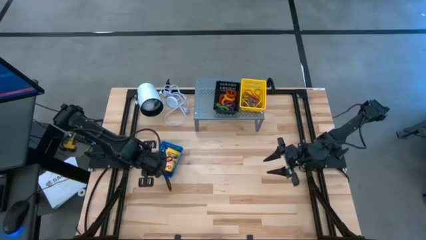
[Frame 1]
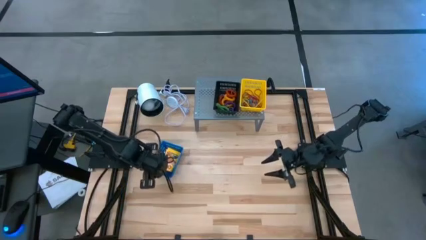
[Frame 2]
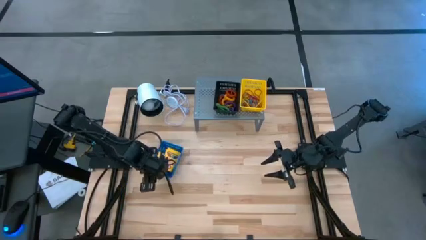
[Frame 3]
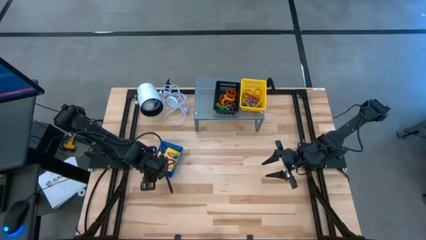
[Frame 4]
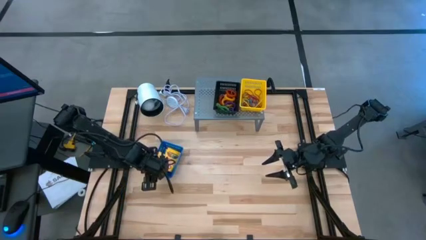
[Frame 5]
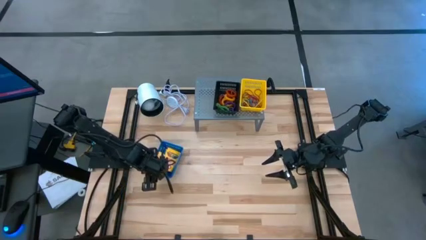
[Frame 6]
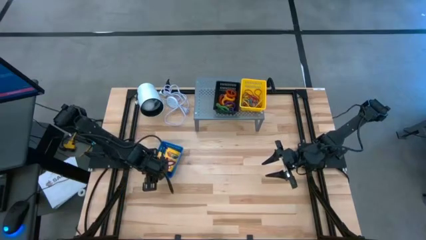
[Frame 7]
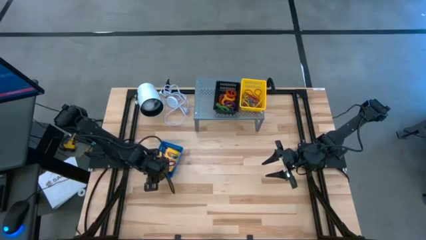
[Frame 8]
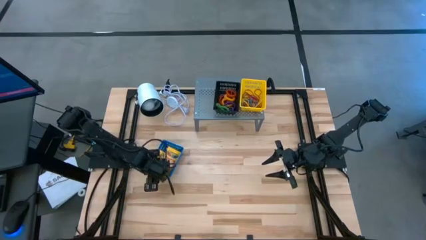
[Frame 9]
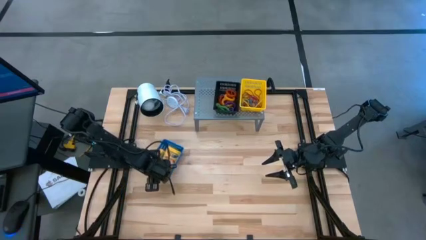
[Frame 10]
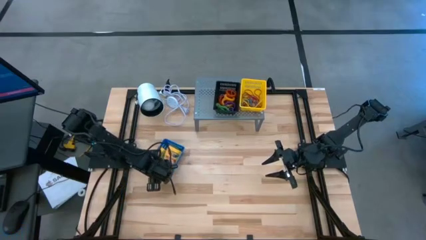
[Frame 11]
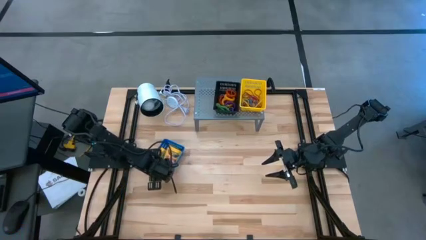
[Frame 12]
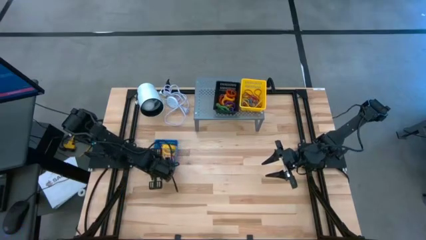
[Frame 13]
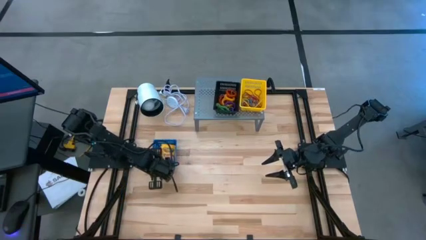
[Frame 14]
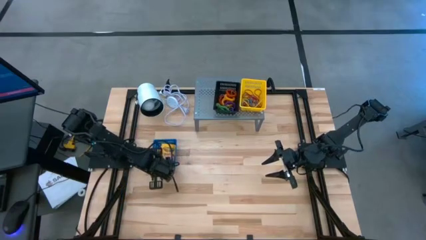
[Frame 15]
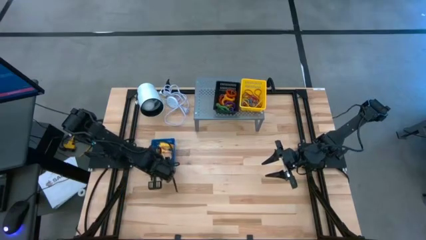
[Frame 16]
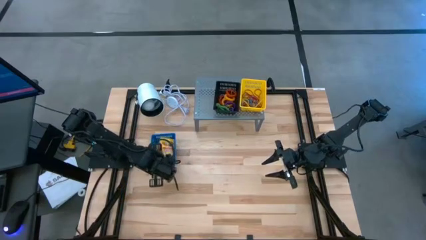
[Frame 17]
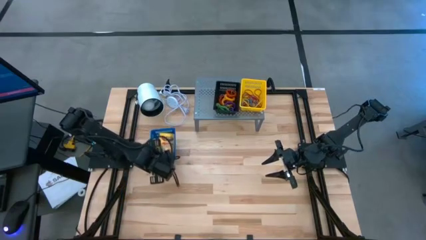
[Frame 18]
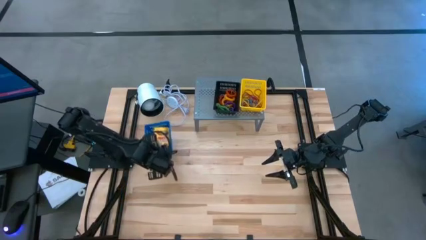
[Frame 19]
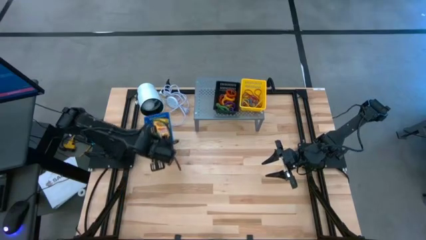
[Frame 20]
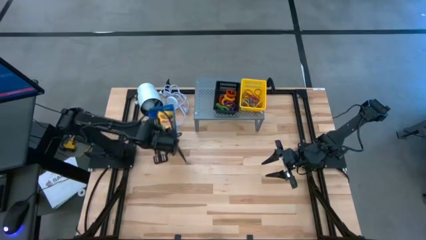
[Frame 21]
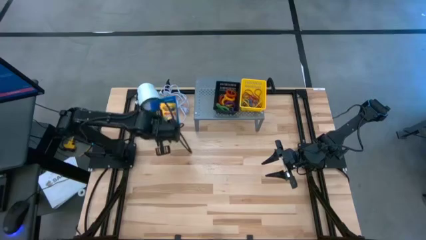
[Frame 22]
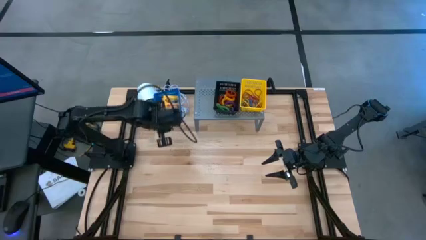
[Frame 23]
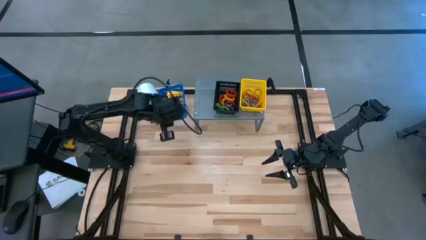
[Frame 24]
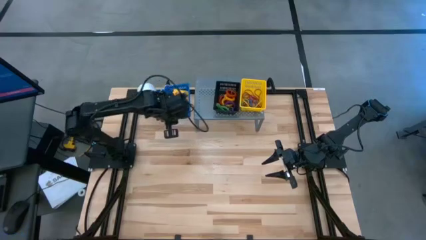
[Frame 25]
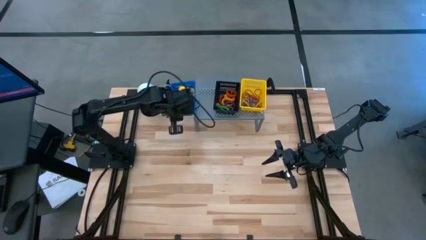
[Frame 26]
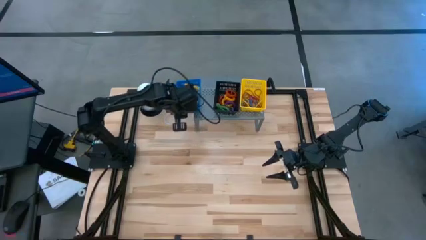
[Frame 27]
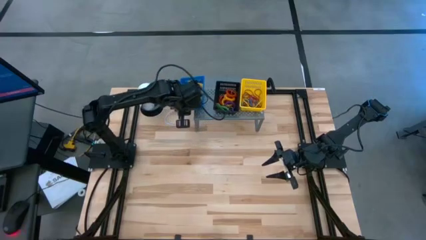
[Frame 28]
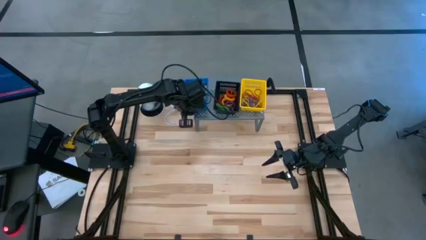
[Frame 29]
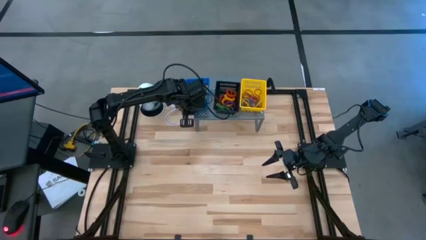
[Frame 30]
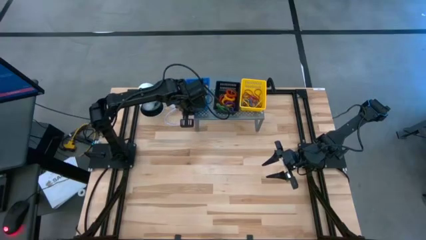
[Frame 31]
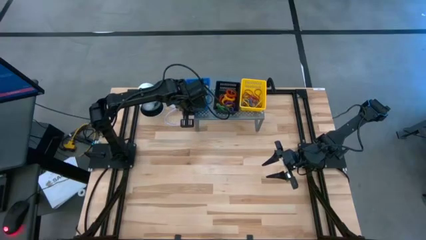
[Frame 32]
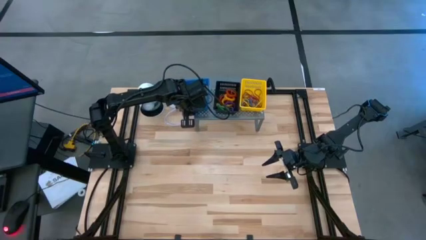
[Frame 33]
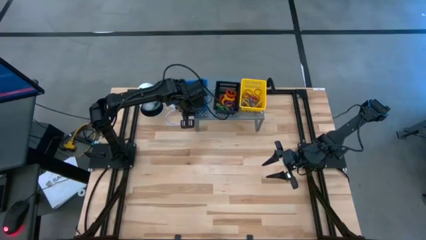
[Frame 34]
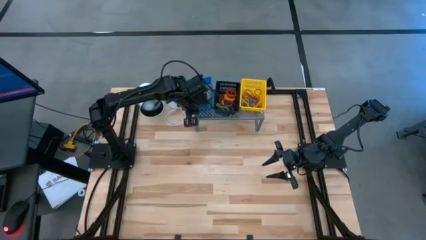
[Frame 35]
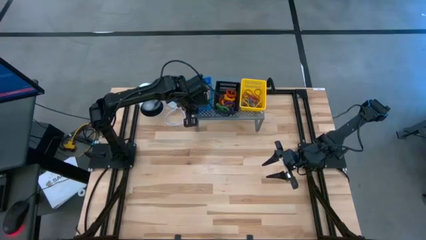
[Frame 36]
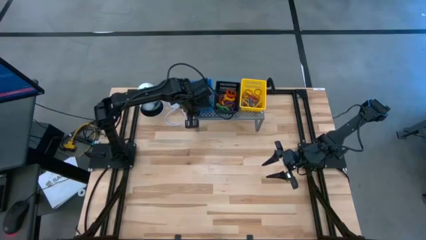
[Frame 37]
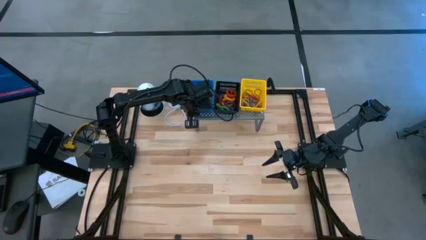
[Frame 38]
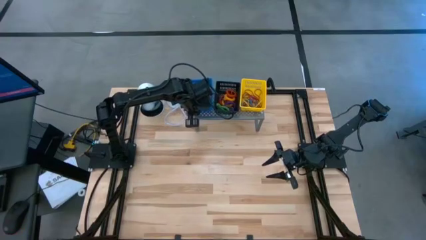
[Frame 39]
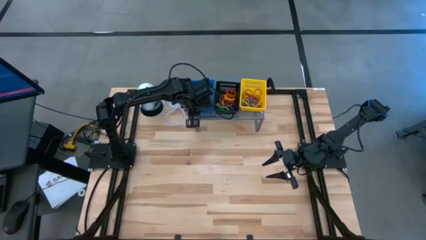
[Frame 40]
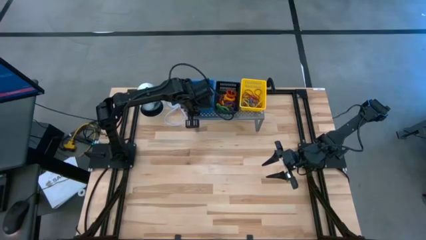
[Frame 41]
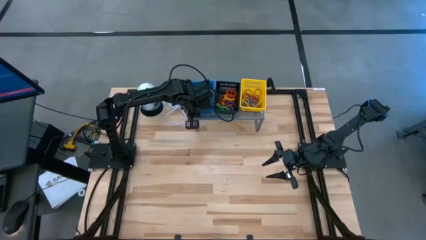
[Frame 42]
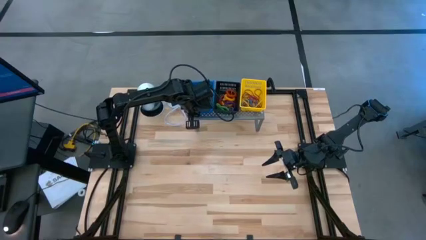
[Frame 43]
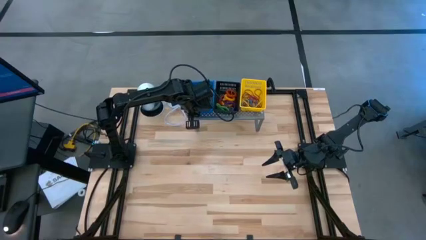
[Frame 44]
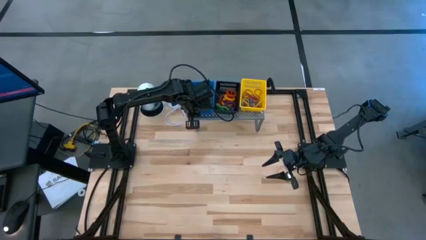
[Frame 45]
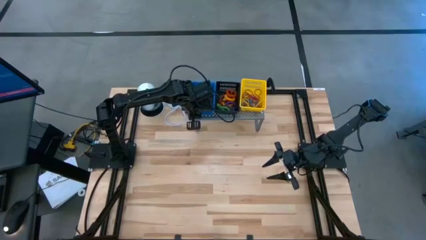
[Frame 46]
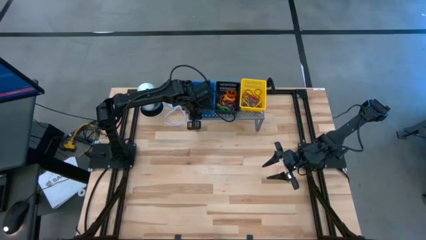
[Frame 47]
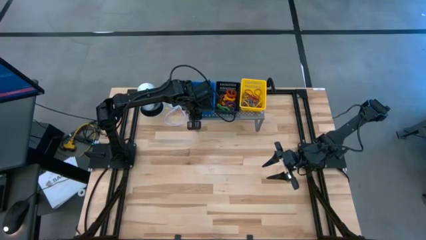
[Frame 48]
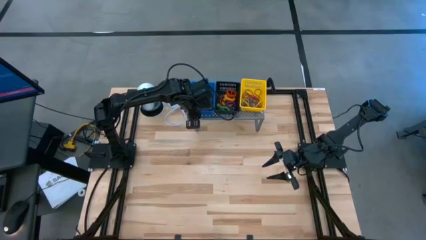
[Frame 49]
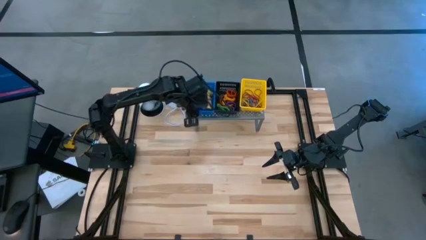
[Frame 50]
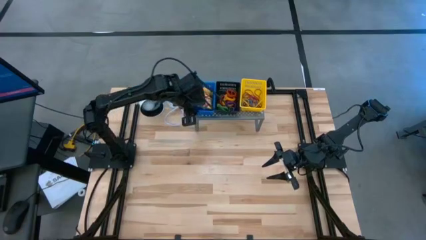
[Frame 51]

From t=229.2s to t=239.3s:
Task: Pick & Place Office Desk Supplies
Put the blue basket filled with crayon box on the shelf

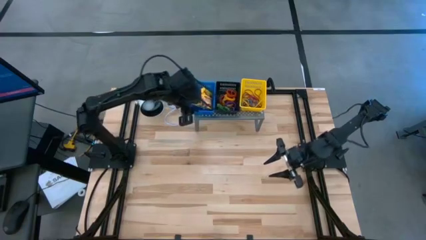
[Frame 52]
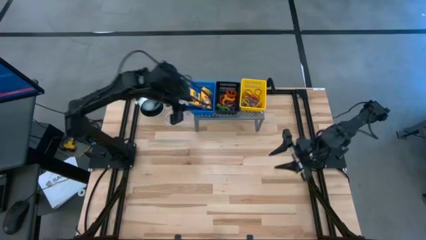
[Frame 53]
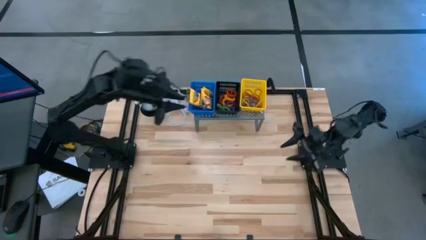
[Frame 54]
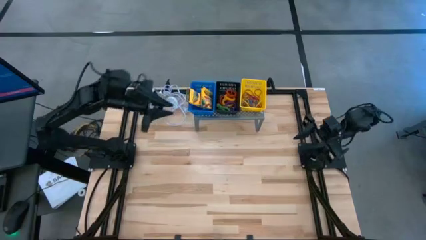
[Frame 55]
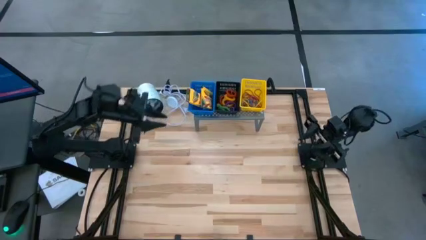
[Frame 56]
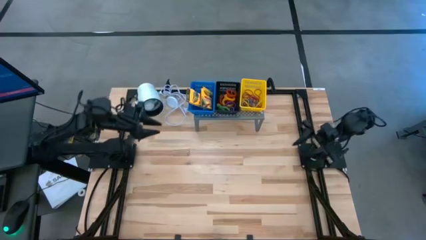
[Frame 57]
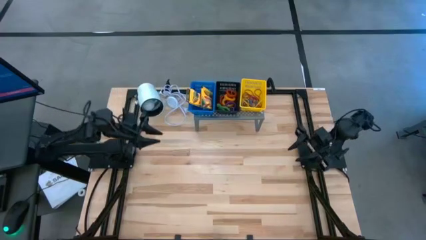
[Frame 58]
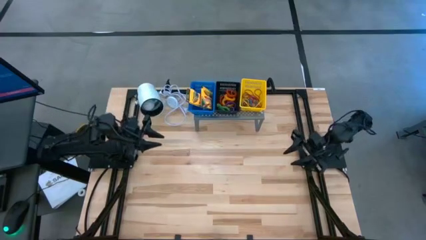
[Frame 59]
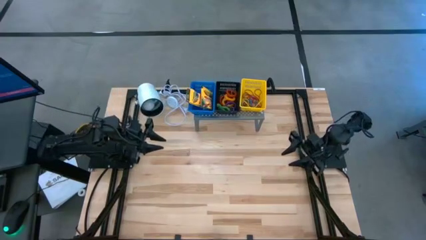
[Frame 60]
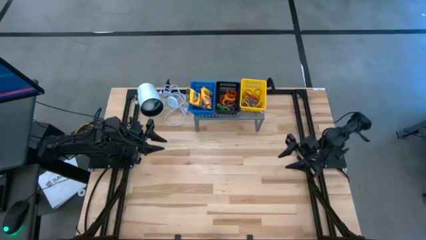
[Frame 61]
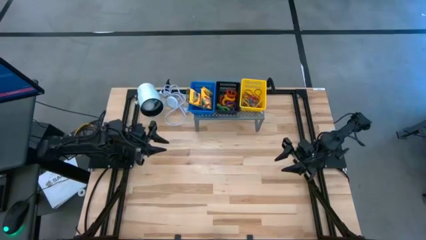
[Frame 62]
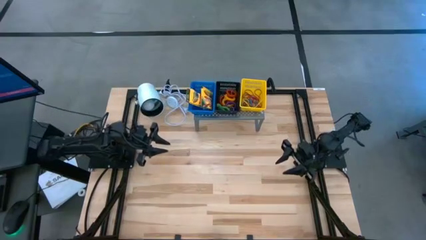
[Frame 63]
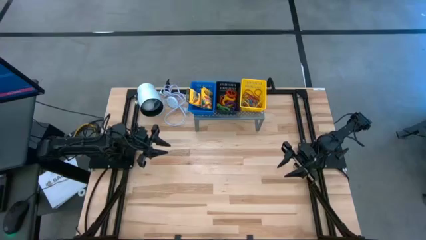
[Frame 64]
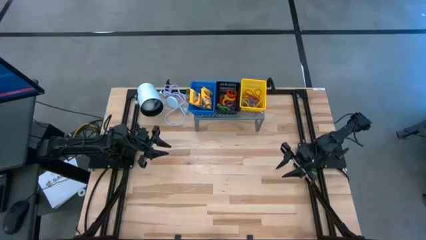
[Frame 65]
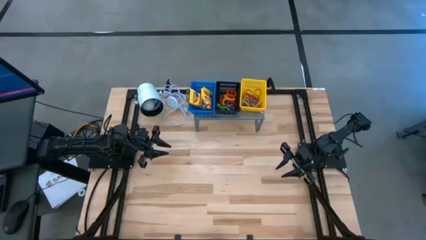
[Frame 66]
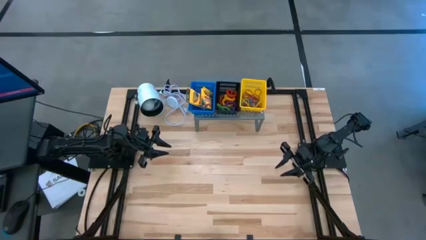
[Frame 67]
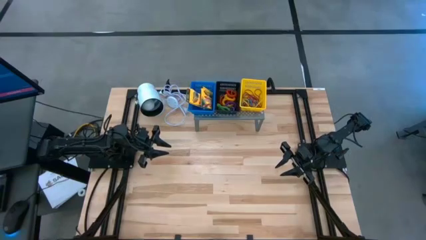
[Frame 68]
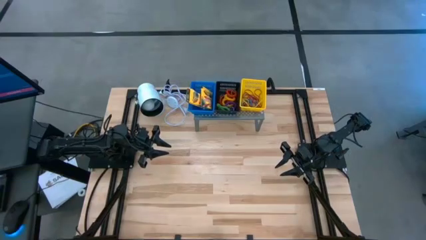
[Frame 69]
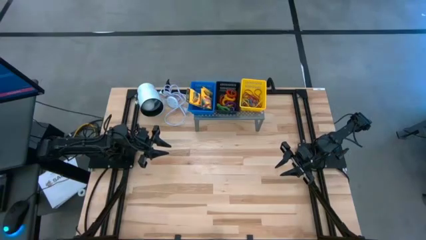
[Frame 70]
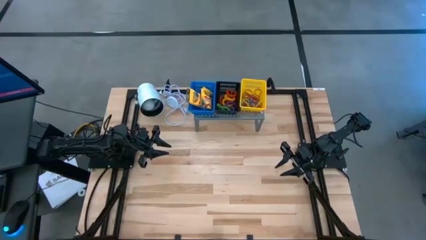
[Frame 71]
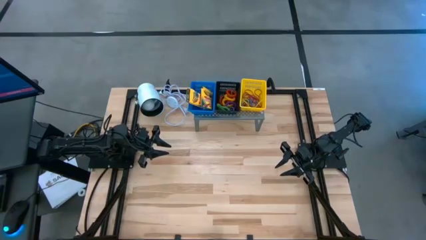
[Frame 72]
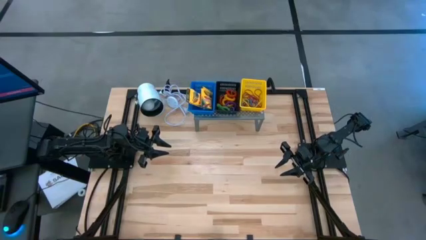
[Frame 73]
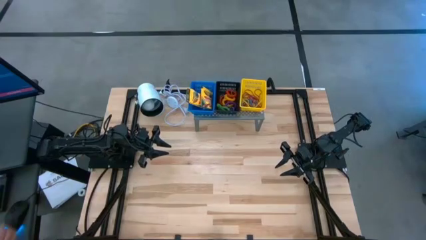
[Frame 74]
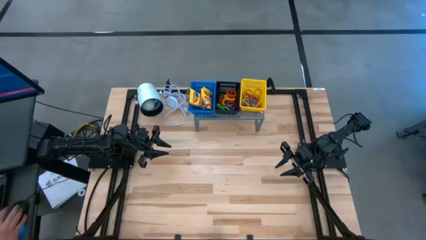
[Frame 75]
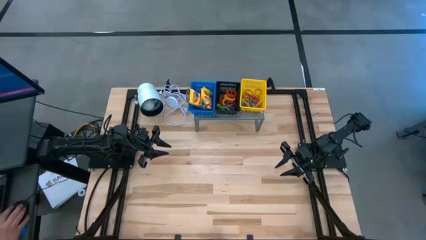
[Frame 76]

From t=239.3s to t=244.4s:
Return to Home Position
